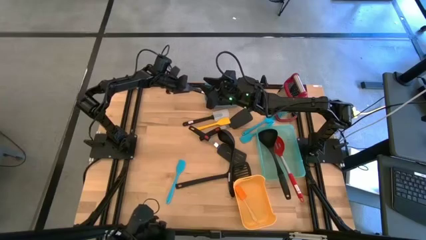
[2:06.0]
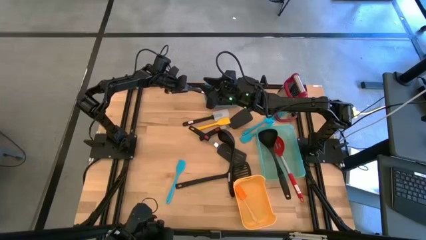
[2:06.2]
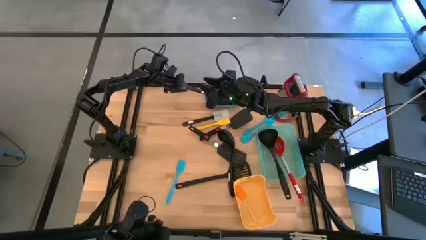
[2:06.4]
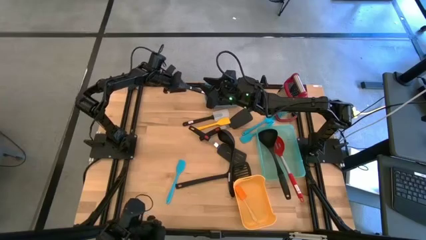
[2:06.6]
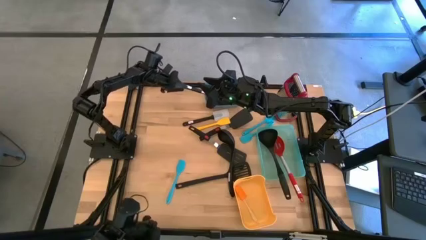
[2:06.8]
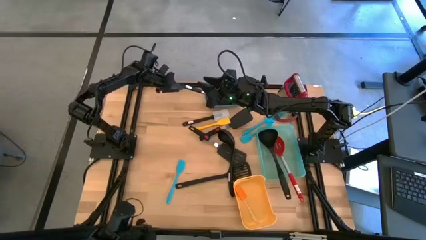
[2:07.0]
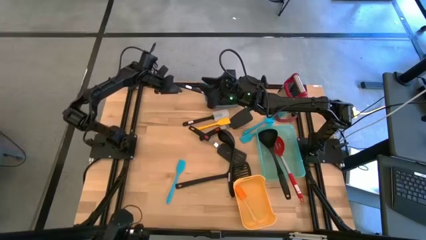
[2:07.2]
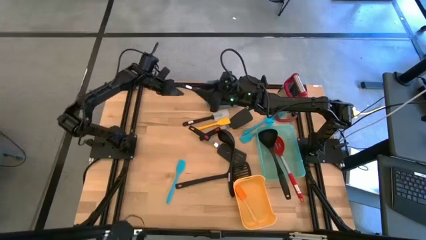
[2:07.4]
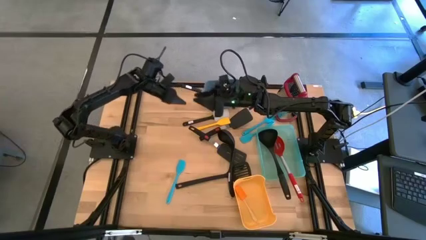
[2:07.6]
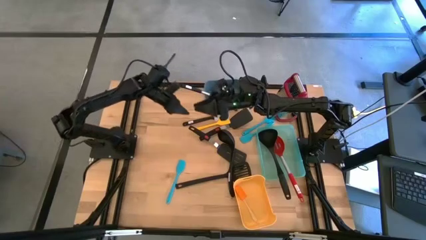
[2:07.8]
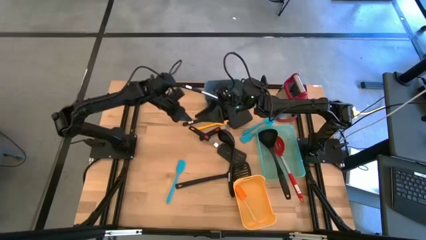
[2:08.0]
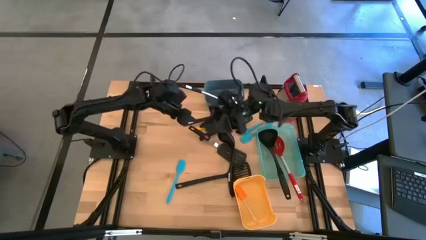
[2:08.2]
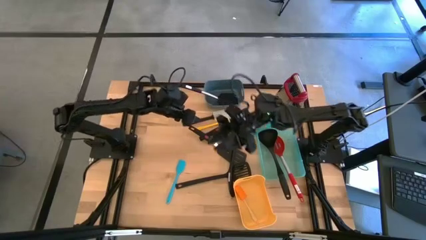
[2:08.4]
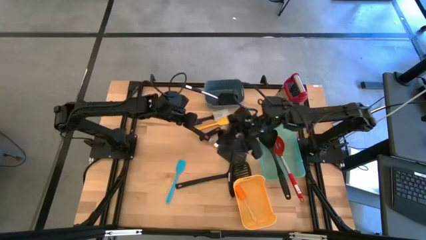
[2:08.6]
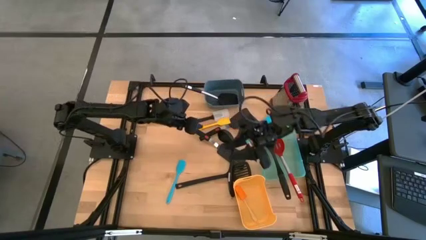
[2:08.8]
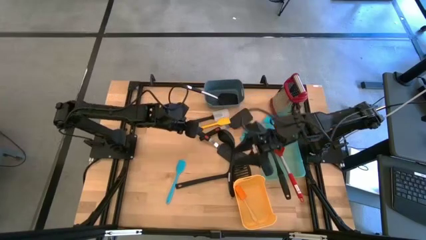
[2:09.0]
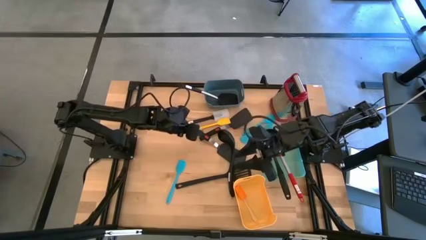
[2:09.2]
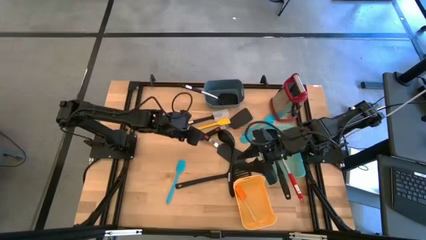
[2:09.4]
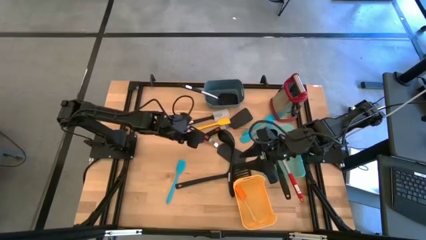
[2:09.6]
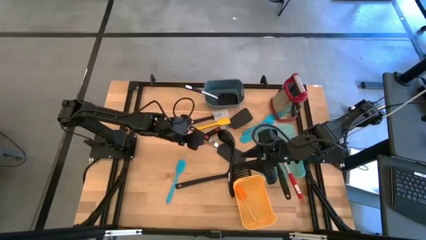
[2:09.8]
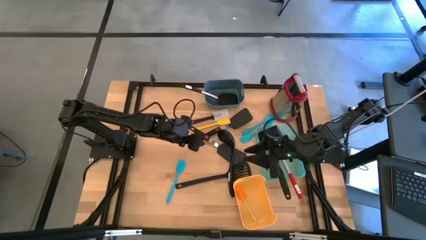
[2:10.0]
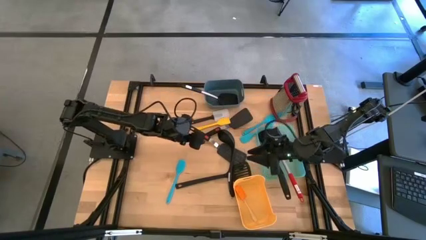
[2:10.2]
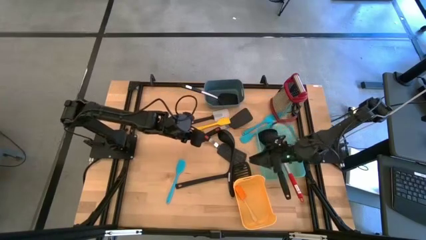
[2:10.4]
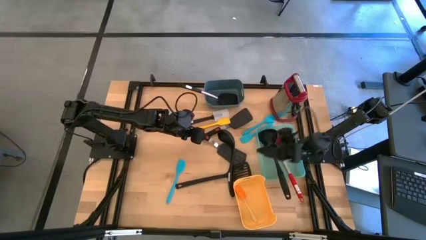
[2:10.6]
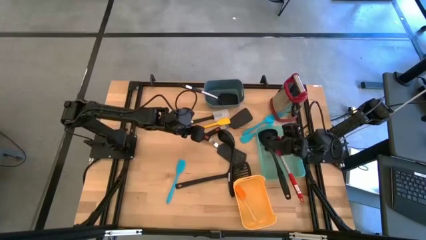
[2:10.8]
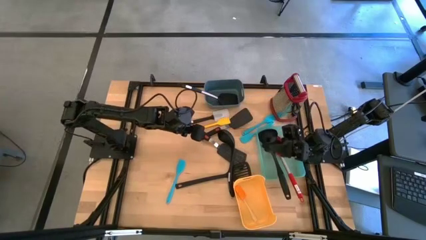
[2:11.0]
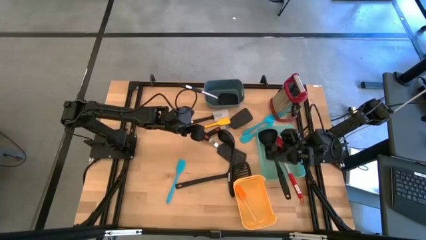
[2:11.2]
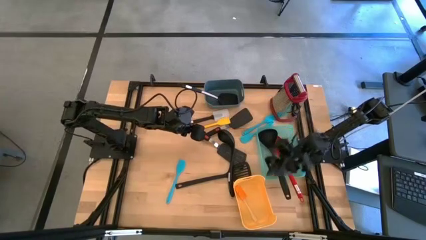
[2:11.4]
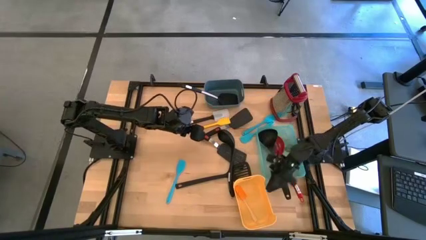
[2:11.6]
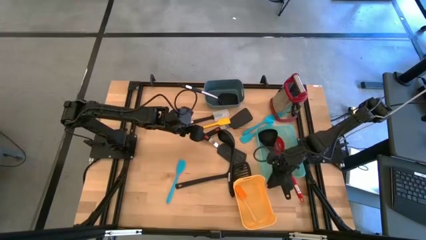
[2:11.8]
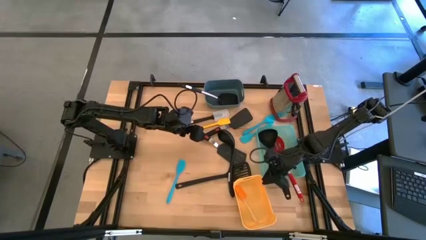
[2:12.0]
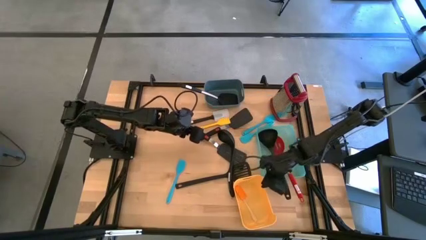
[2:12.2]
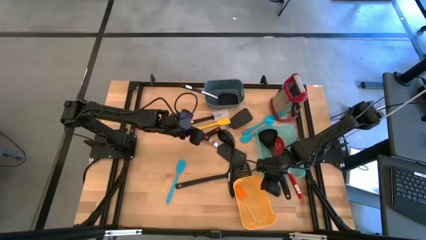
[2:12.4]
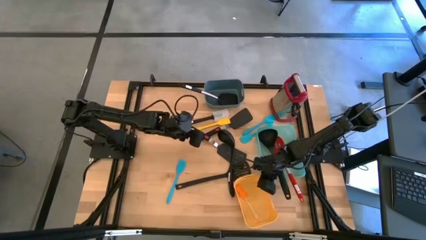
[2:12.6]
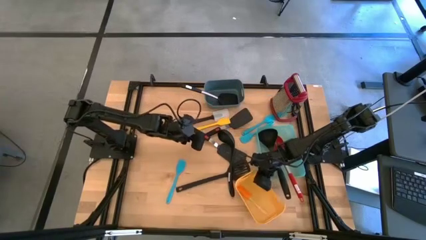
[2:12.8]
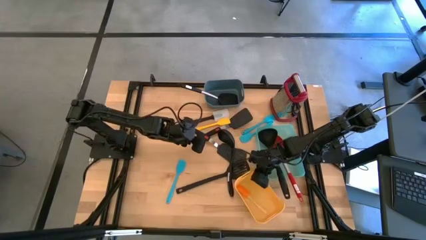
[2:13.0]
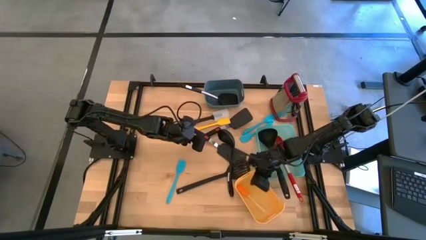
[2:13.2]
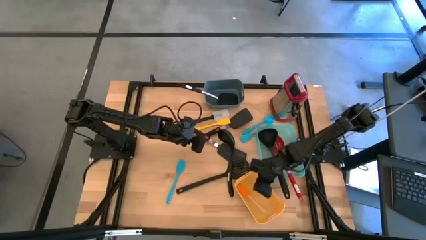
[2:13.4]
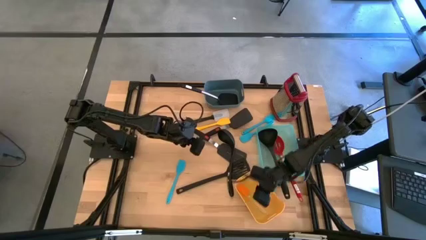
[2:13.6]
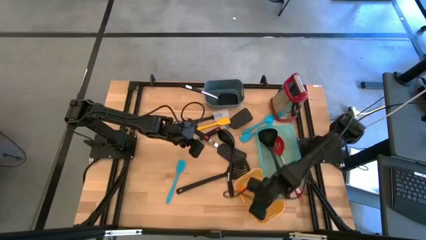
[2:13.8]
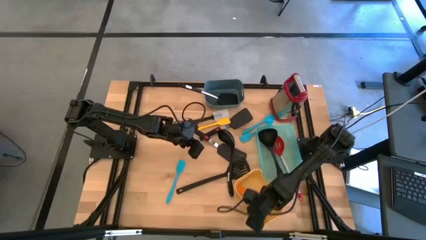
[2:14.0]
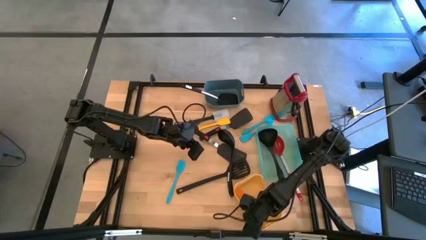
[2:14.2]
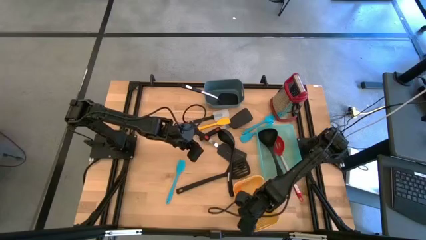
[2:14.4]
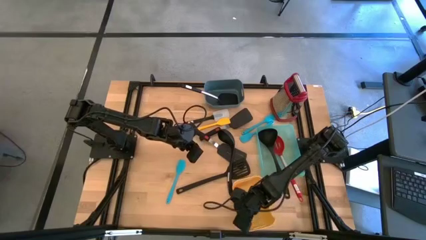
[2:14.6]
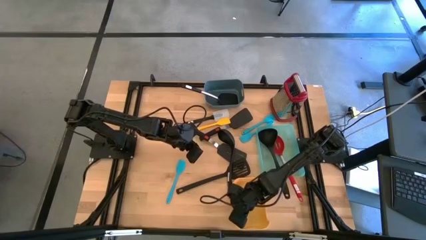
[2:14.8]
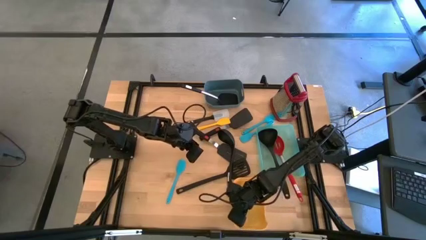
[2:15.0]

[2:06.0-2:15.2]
Task: Pick & Place Kitchen Items
Adjust the yellow bin

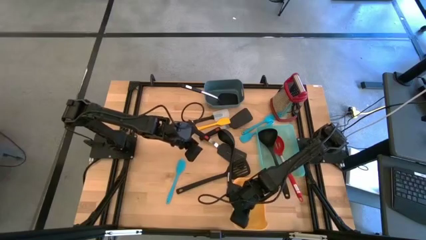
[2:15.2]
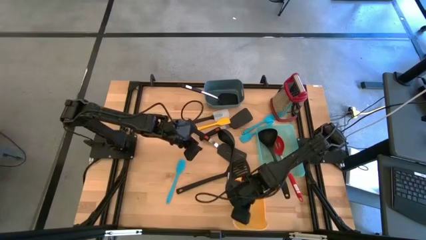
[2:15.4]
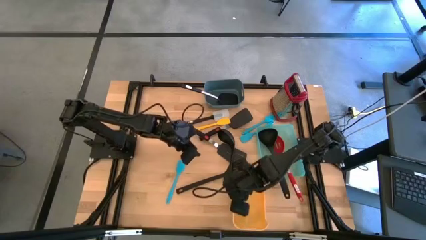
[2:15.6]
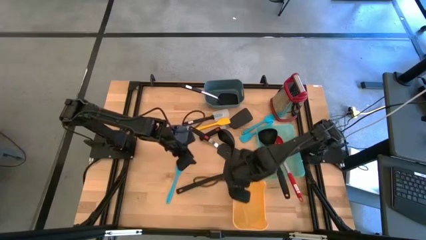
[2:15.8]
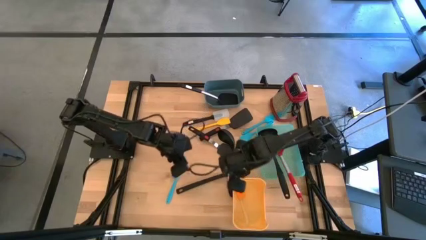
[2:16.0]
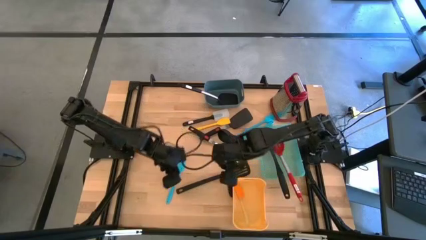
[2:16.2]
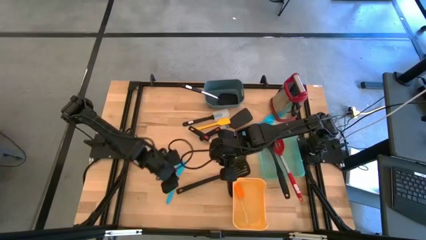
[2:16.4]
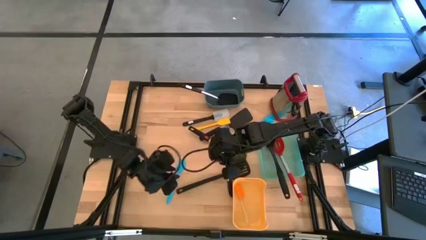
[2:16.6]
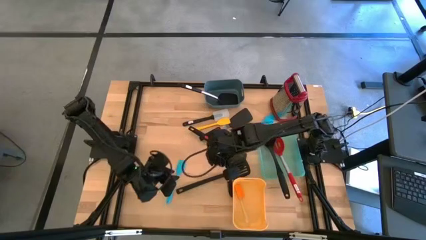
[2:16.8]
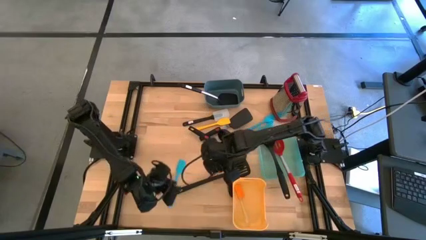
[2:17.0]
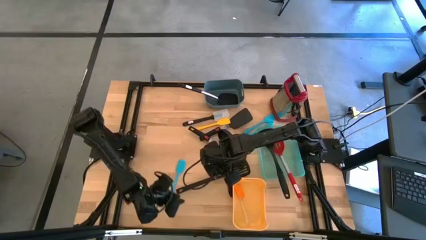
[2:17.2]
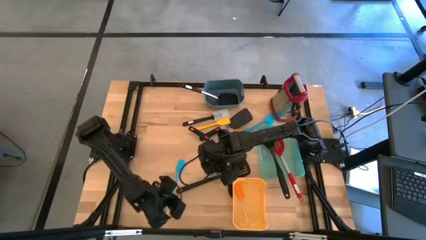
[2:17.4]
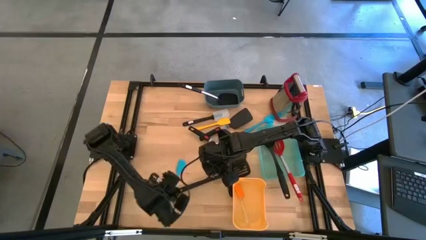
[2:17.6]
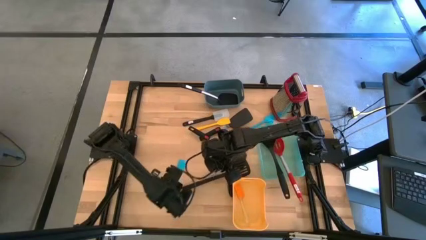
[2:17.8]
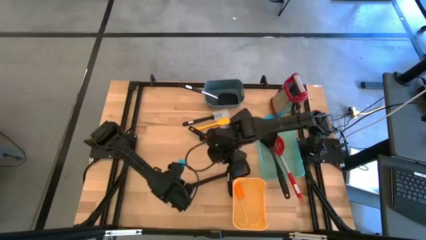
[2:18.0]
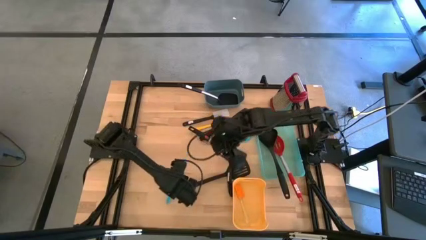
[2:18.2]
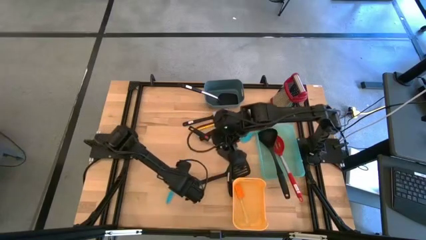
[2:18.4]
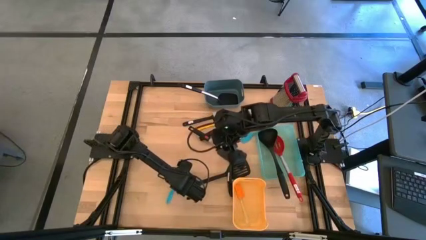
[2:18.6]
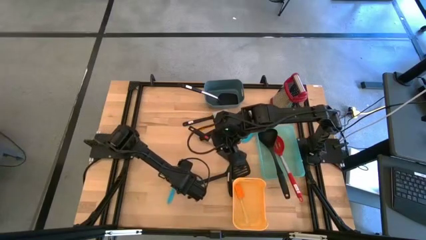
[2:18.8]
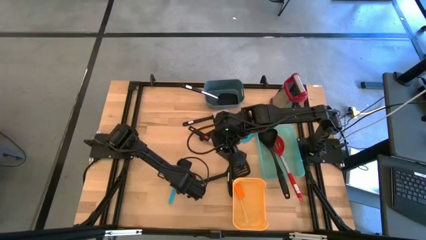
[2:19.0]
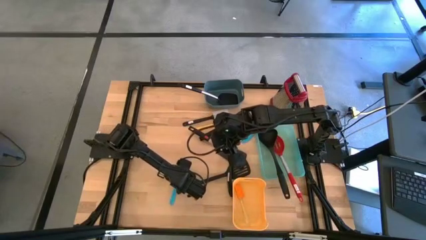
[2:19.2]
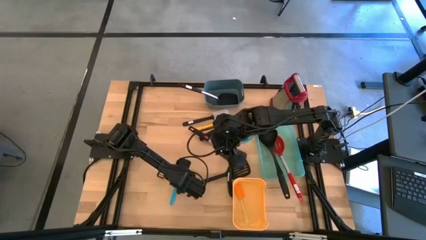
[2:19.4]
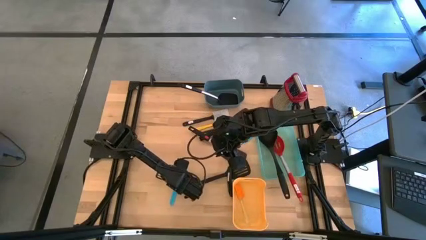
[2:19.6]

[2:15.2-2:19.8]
Put the small blue spatula into the yellow bin
